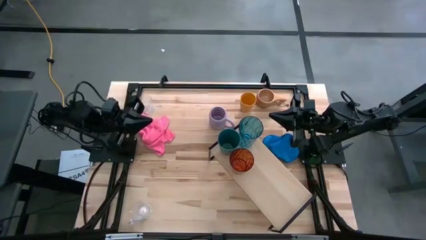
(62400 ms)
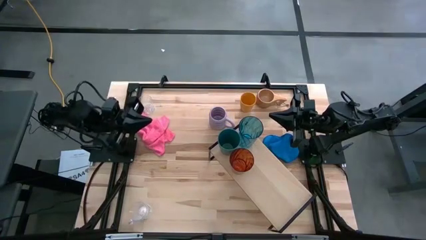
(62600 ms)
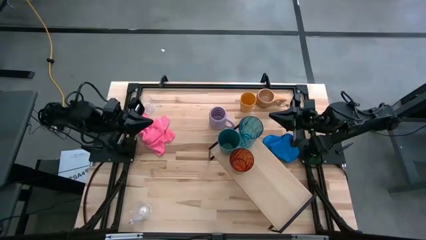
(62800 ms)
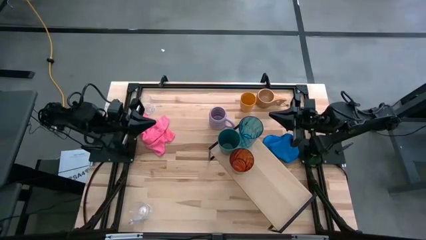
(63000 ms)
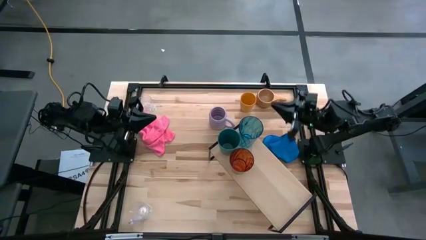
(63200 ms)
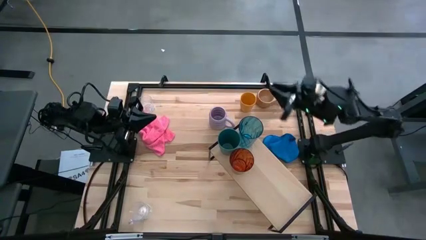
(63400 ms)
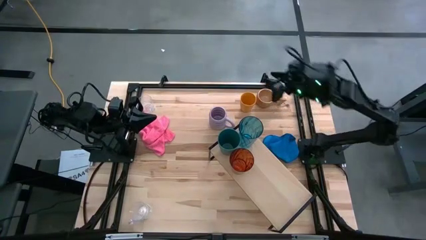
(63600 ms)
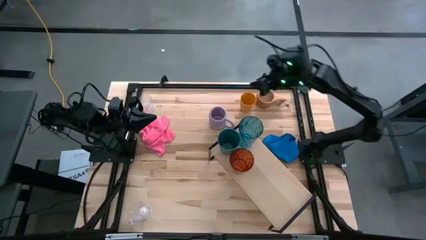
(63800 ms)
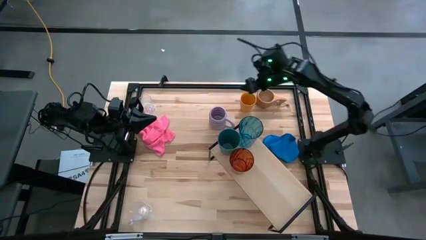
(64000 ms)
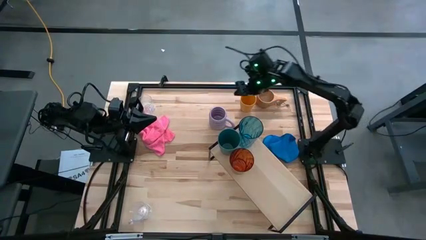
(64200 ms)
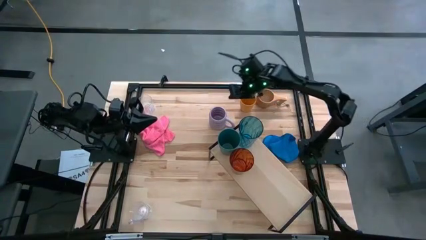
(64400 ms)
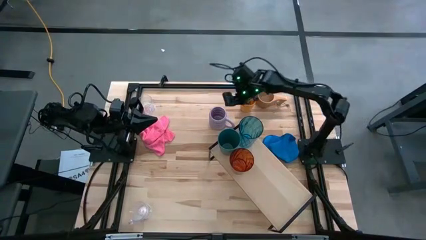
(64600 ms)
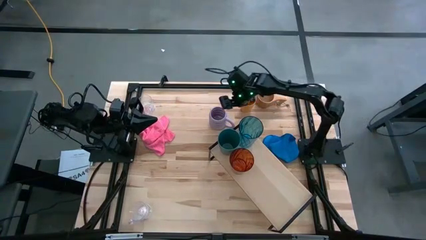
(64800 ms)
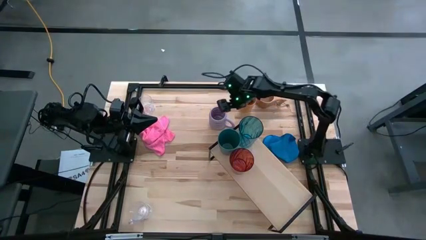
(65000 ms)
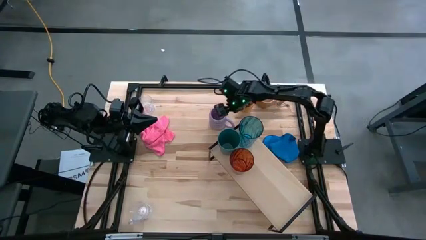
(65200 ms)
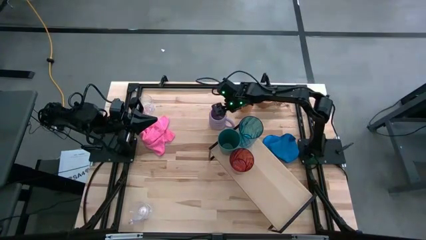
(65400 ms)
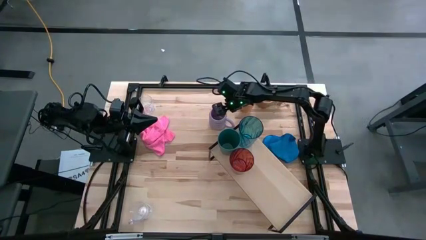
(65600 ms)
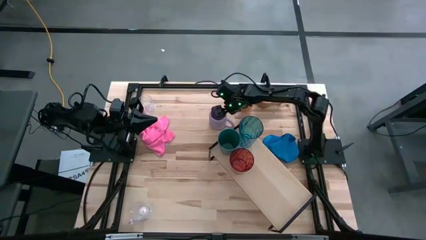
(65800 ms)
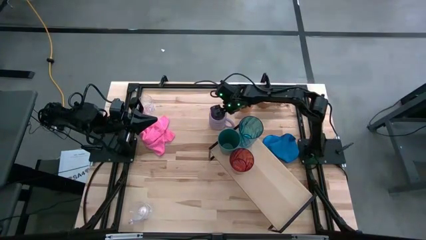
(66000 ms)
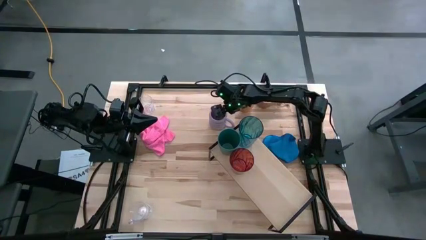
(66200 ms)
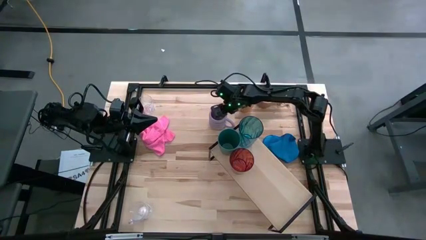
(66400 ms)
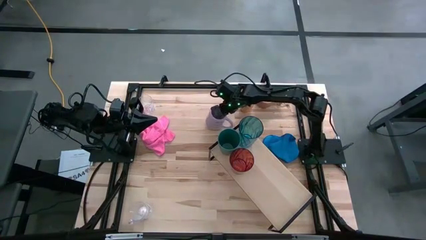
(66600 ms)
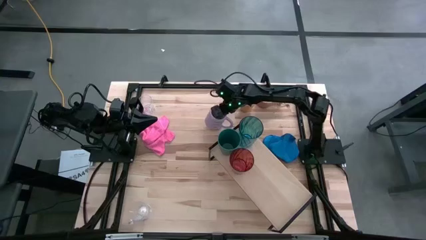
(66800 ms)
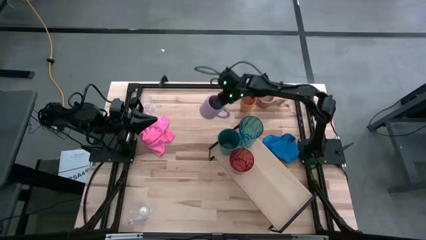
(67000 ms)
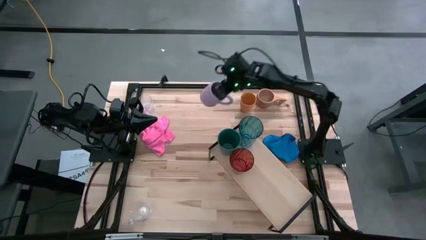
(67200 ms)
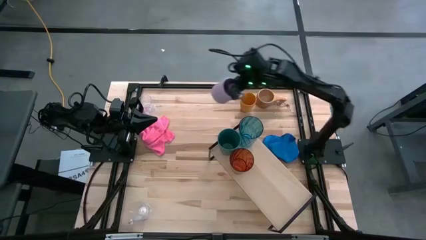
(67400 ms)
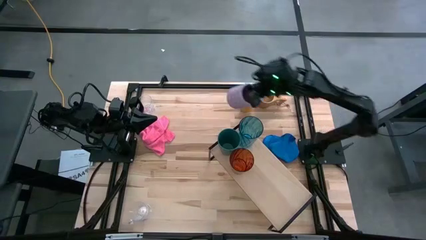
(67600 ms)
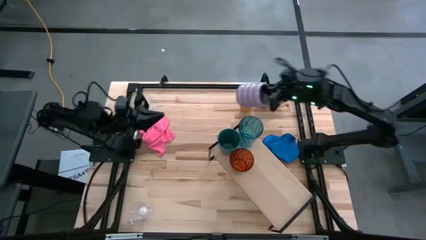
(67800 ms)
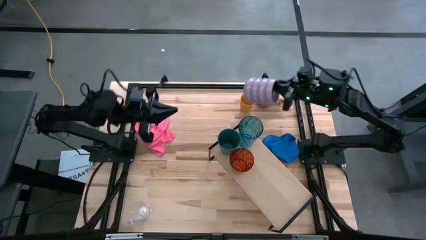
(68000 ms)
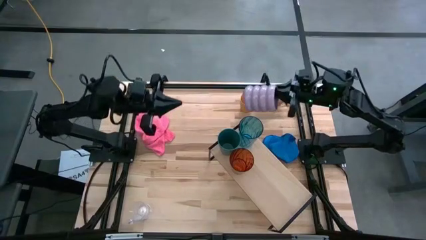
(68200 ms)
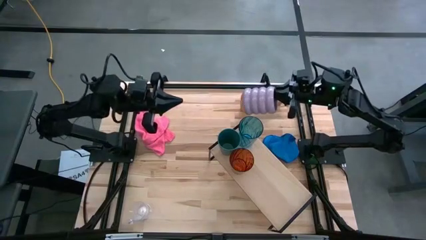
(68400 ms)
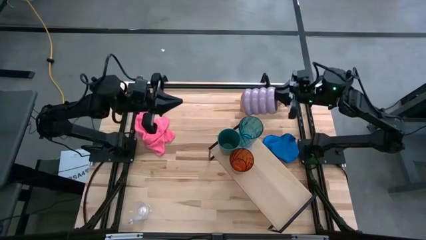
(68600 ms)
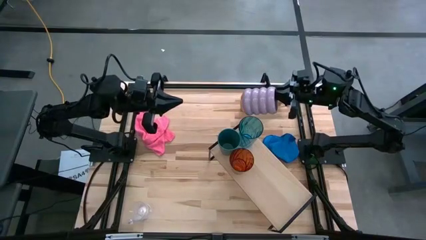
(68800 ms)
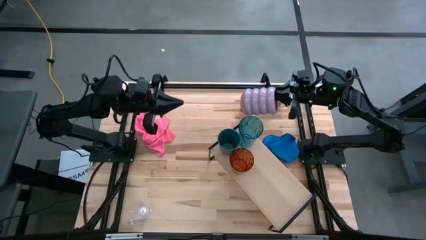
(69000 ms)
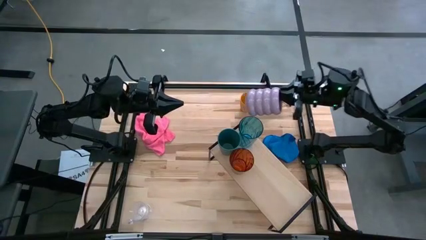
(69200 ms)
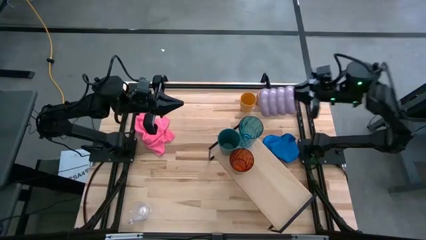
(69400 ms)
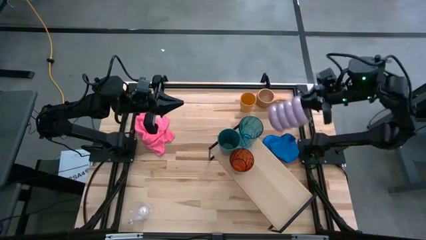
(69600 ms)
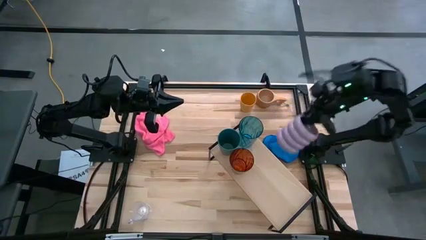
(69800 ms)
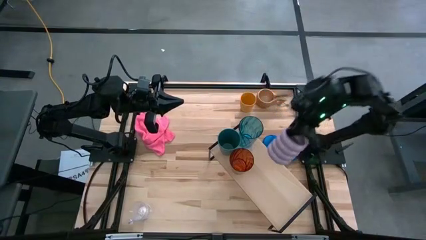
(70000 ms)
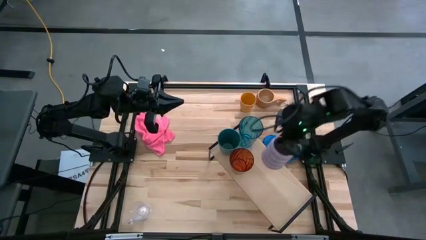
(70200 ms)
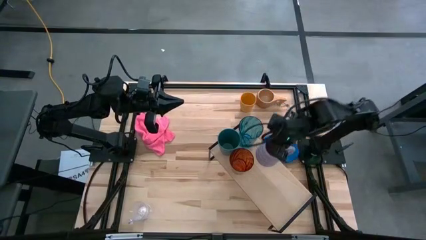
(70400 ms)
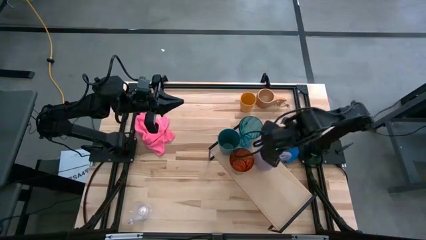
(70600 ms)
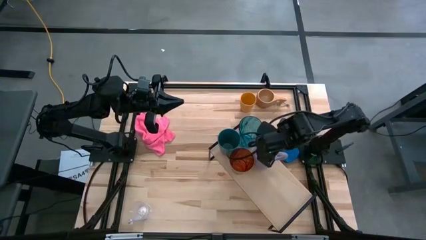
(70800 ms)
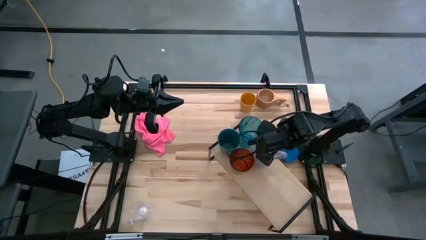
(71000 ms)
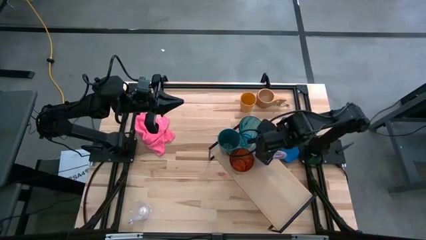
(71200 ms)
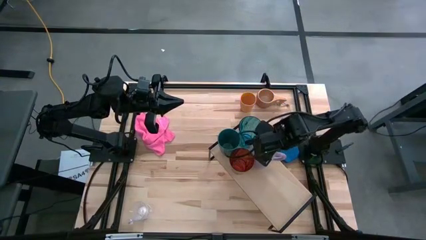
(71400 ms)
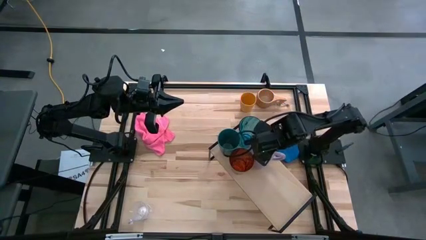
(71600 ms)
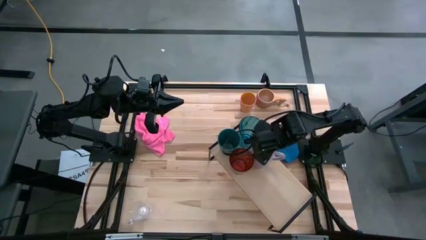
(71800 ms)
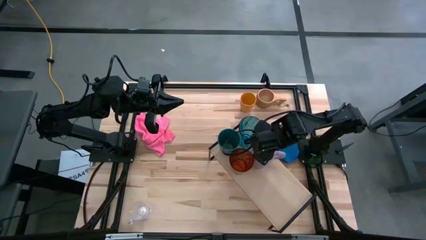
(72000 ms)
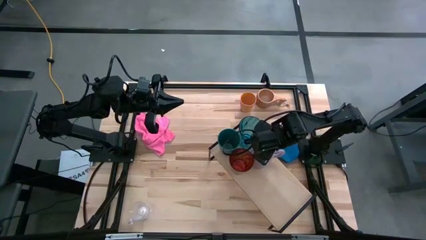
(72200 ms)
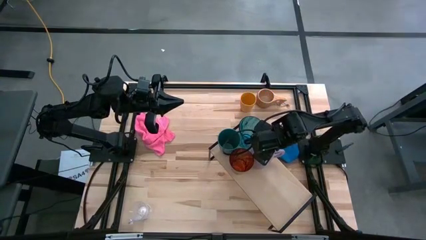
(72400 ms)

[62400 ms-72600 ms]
Task: Stack small to large cups/mugs on shelf
Put the purple mug on the shelf
